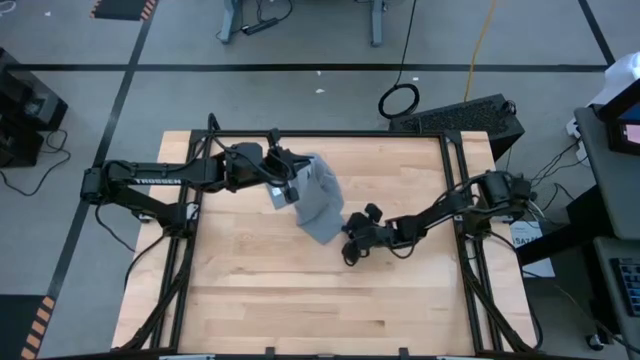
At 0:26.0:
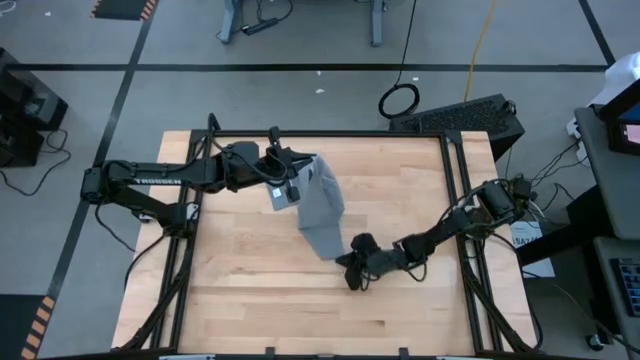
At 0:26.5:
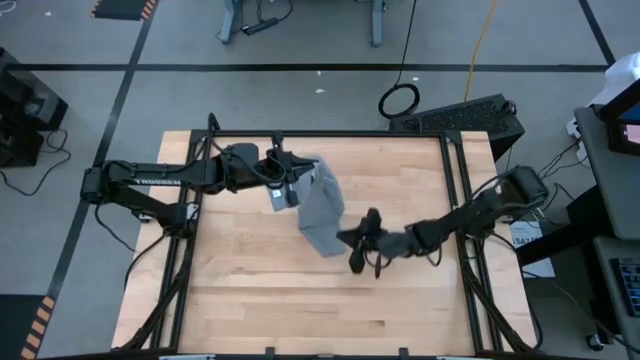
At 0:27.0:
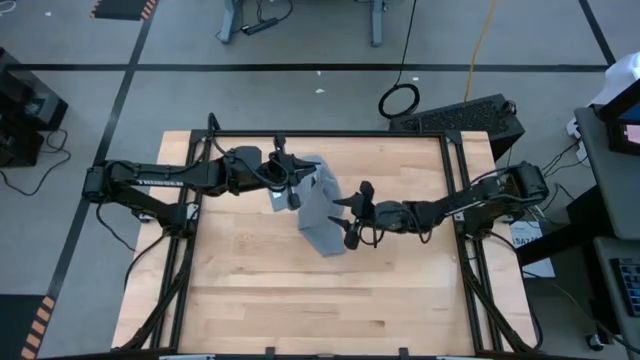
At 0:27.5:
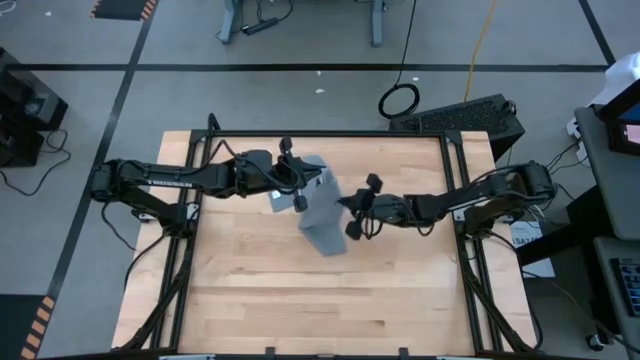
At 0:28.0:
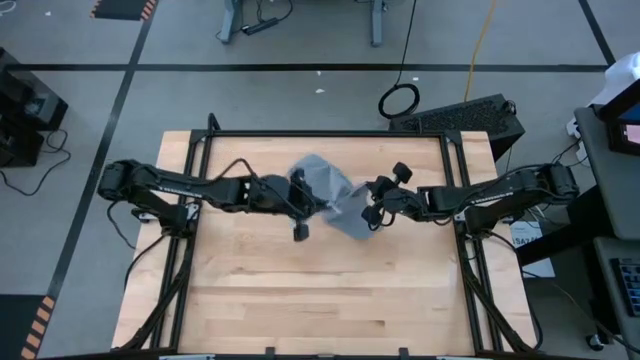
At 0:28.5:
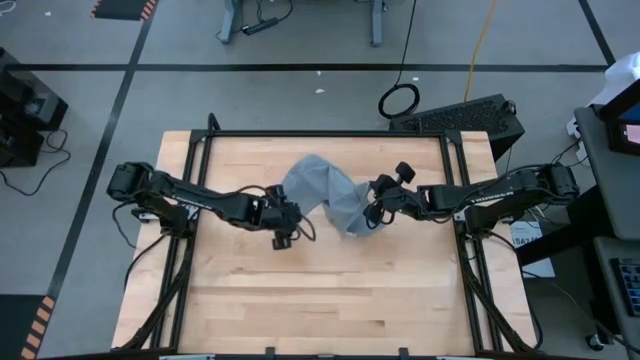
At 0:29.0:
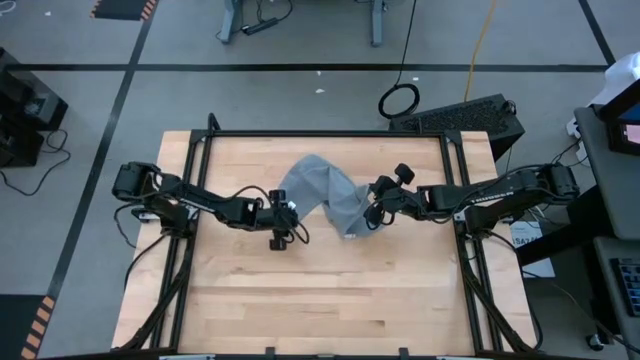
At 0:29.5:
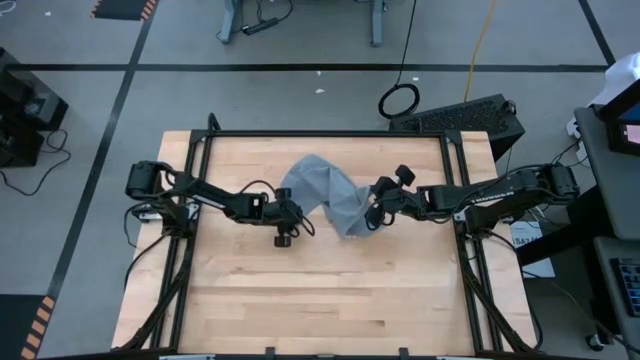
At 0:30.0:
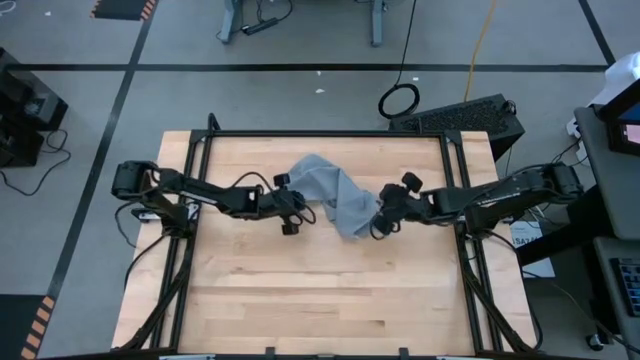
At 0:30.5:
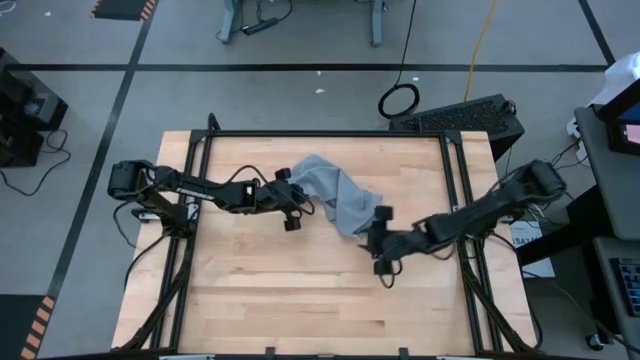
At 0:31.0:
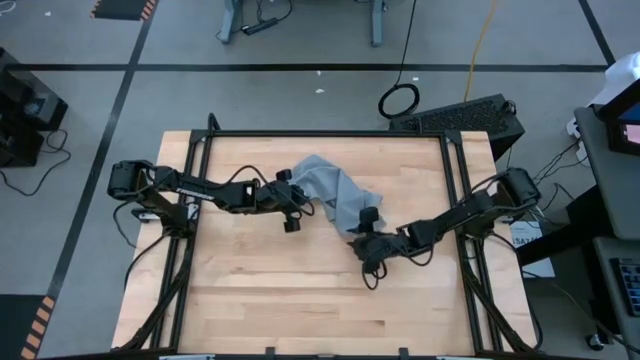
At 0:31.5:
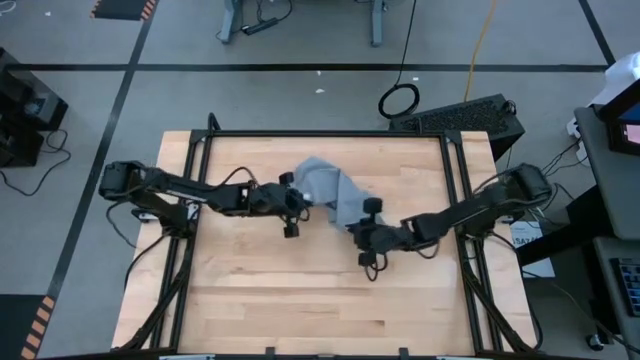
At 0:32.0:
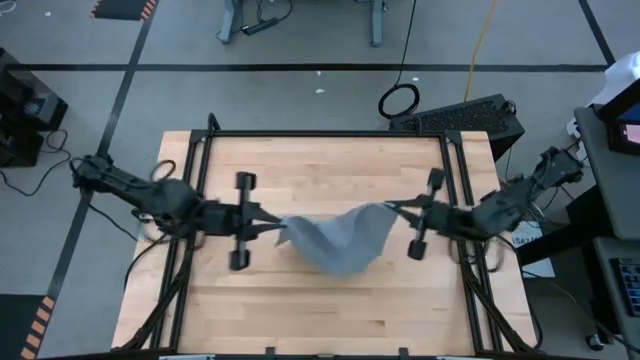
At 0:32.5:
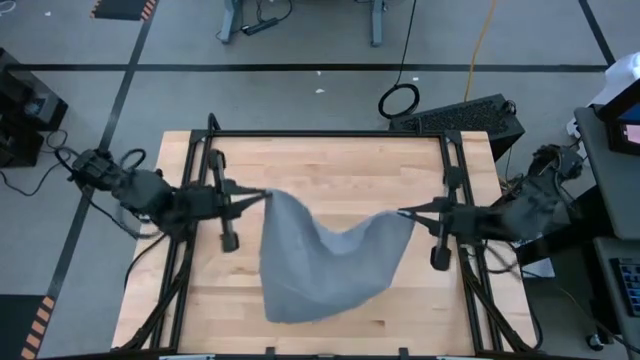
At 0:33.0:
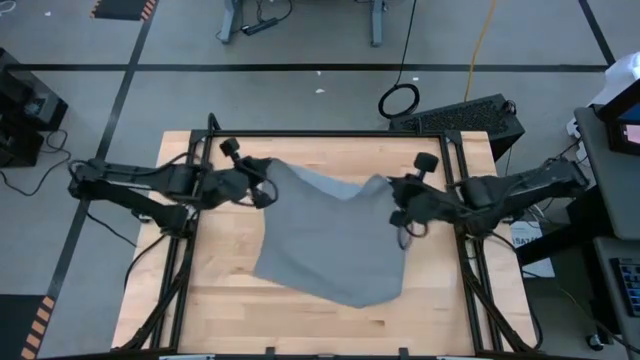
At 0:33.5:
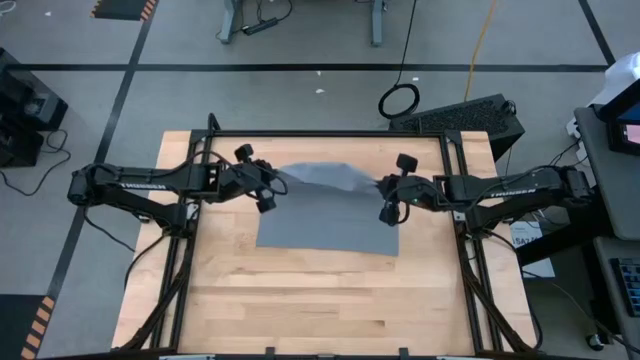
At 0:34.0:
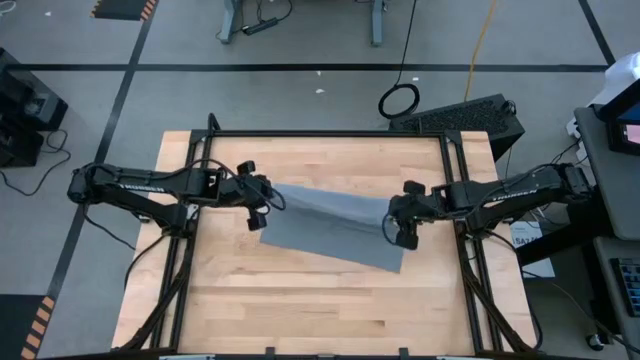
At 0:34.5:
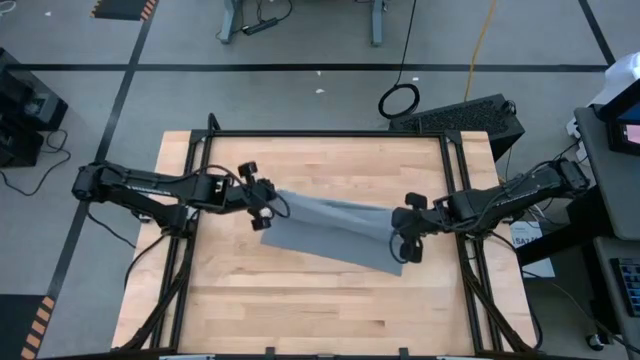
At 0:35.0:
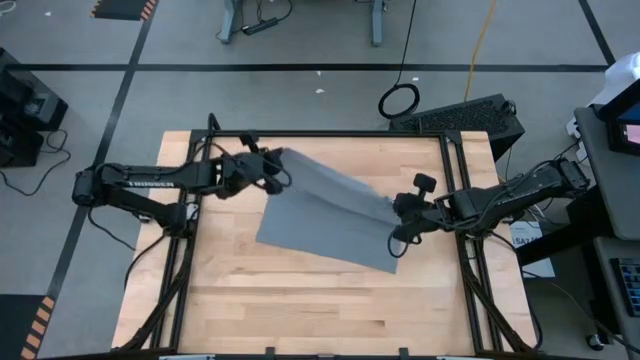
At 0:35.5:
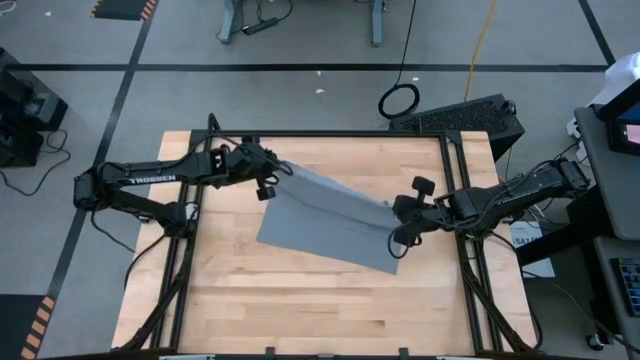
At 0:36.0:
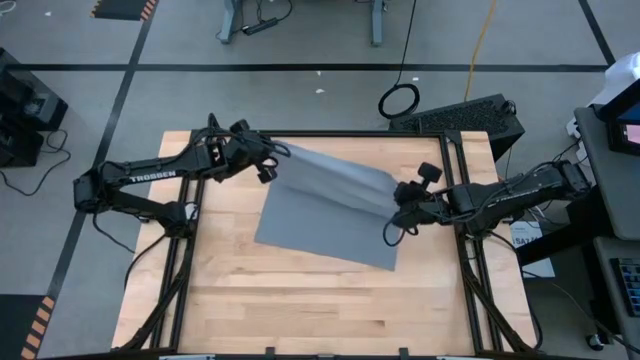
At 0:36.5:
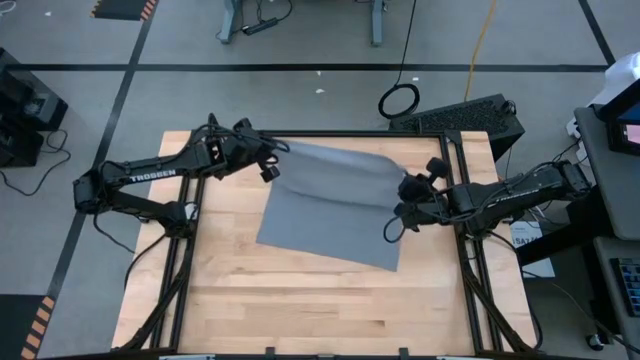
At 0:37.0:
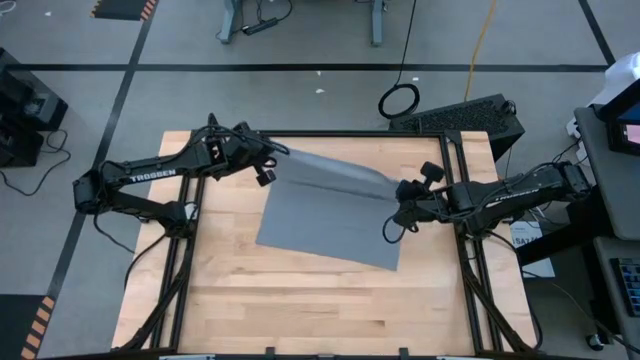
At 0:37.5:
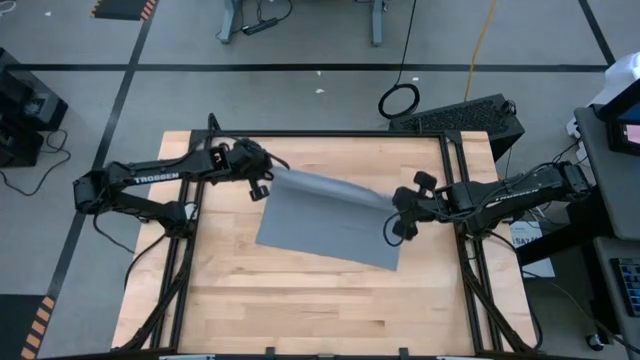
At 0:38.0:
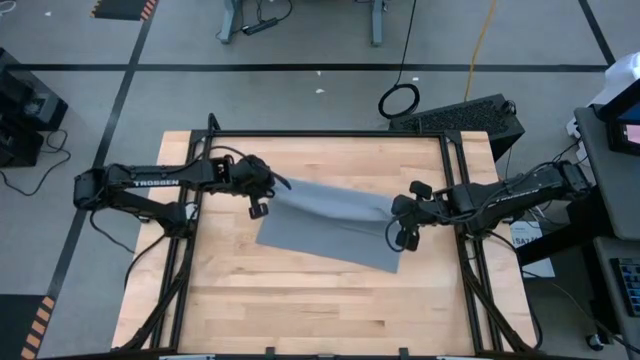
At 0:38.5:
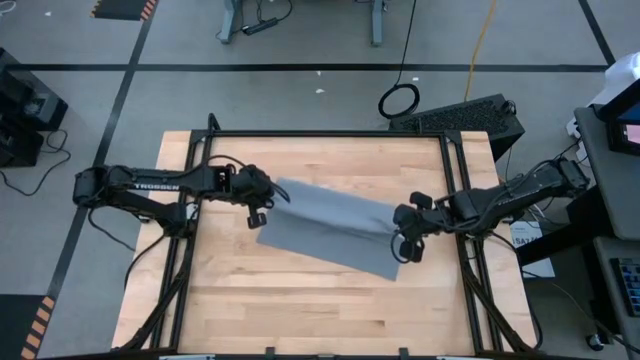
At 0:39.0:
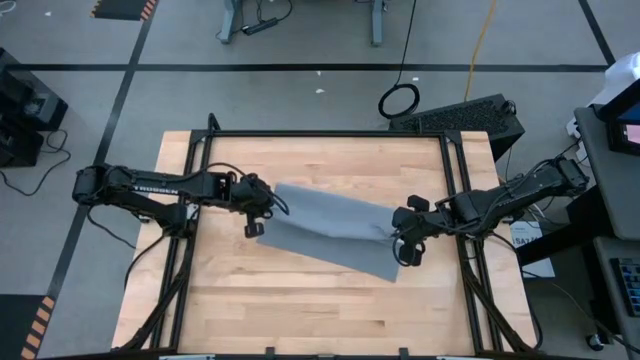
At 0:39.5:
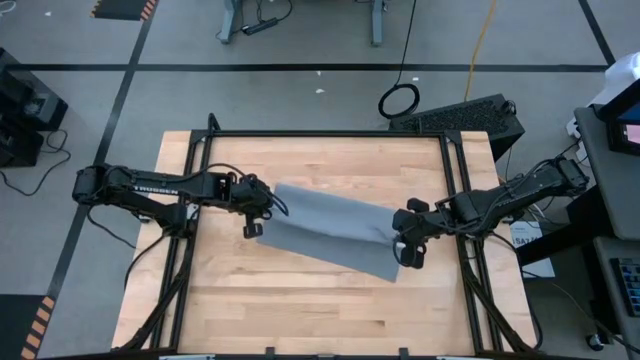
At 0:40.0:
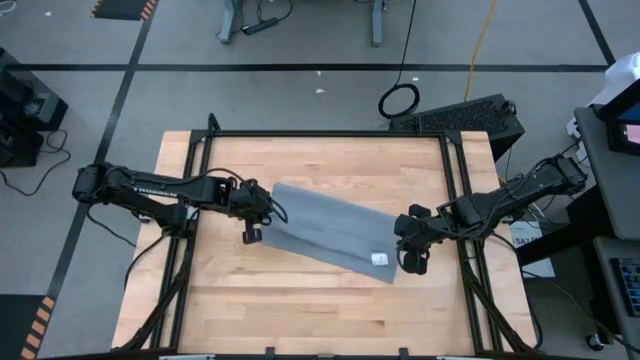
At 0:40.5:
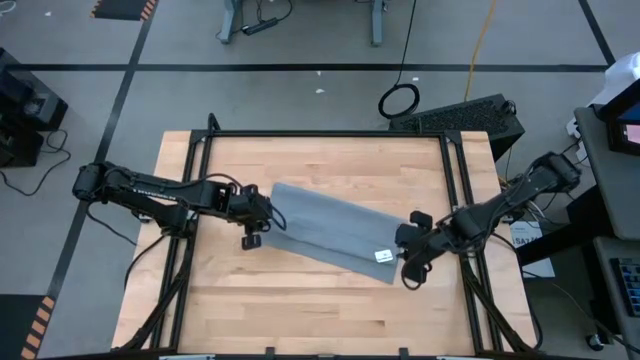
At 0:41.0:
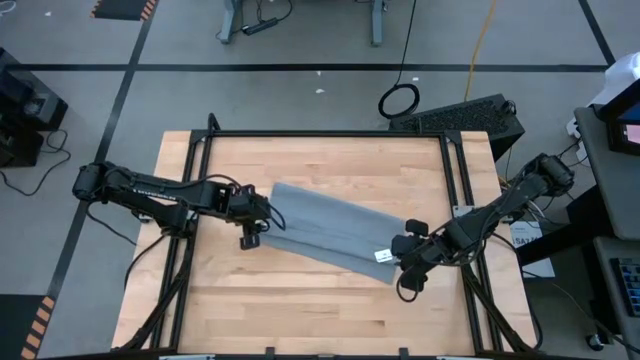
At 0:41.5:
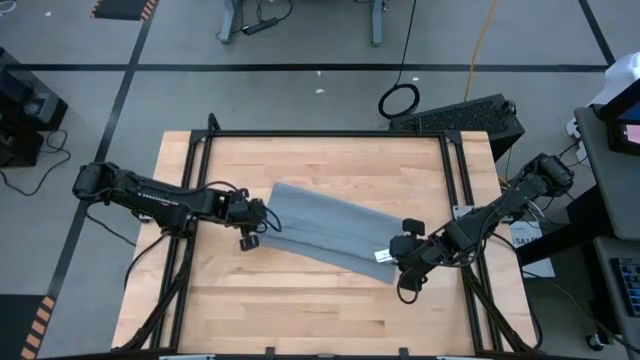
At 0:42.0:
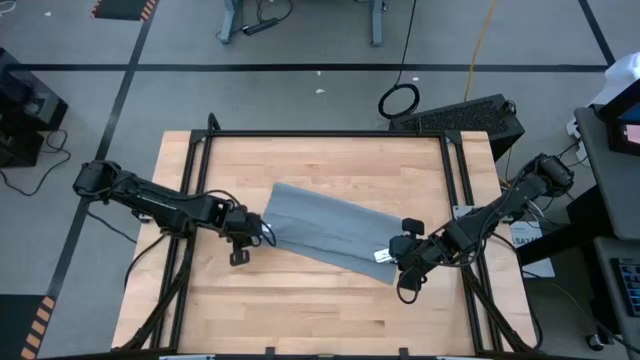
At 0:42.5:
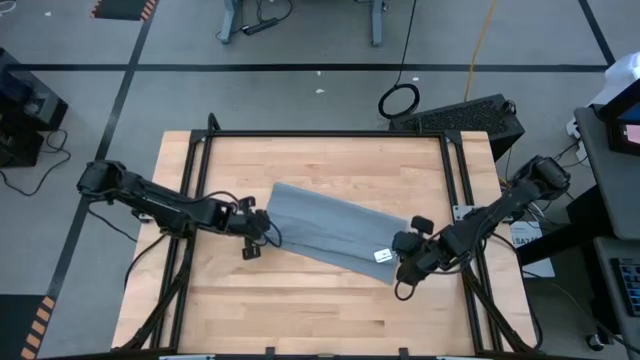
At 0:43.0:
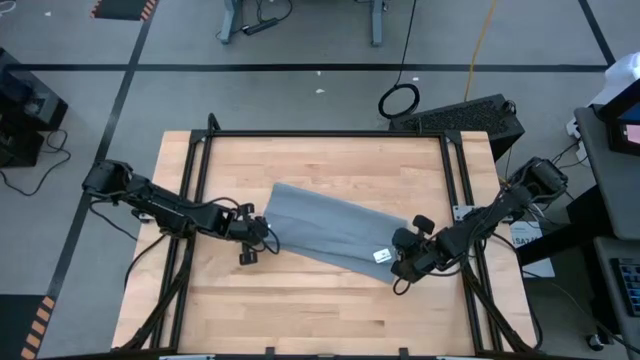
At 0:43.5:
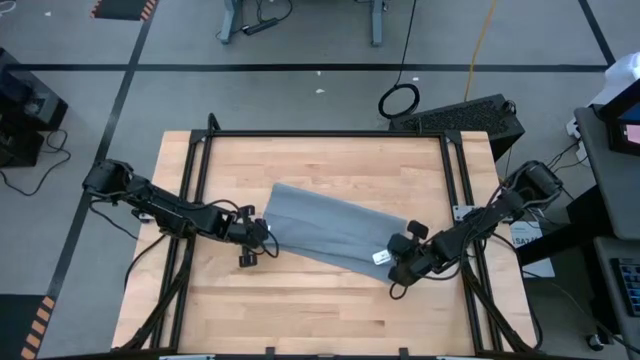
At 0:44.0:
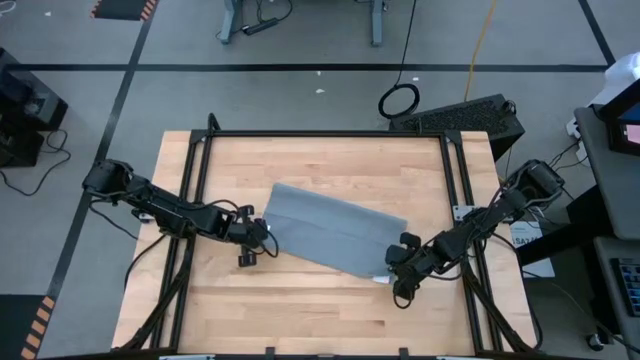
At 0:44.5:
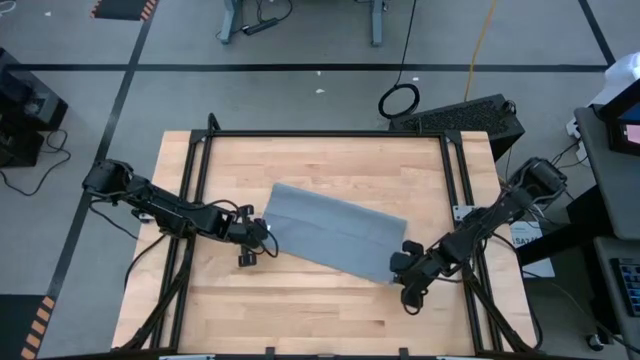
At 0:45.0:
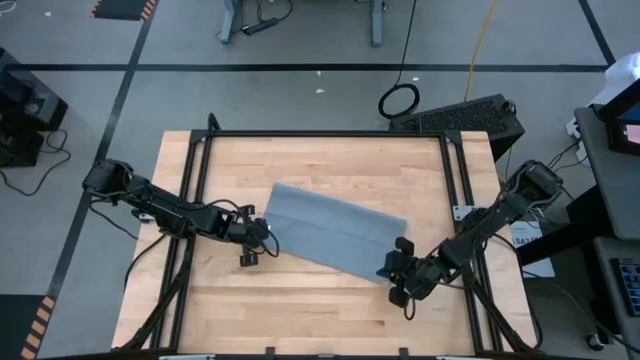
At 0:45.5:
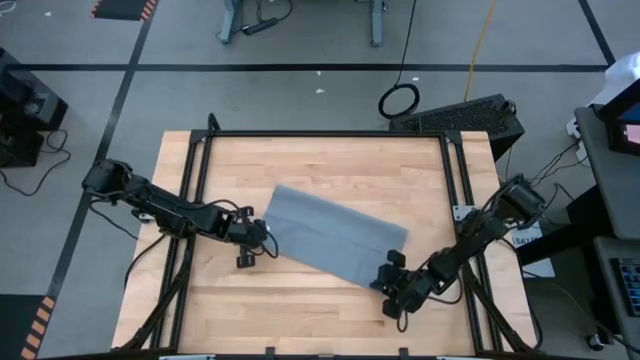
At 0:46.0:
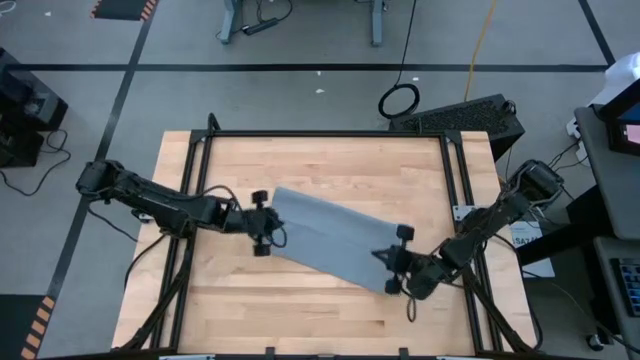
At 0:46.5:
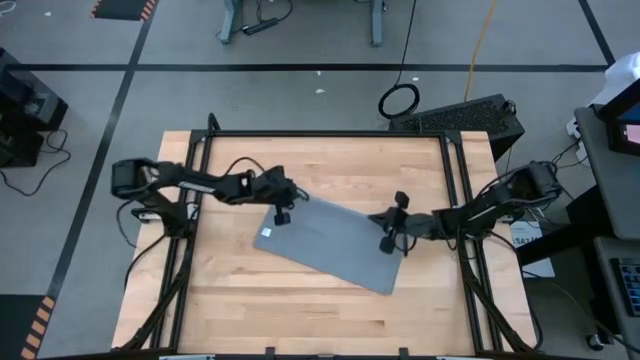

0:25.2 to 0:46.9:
Task: Roll towel
Fold the gray towel on the table
